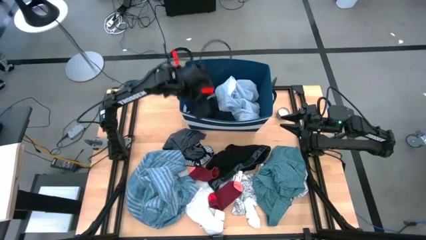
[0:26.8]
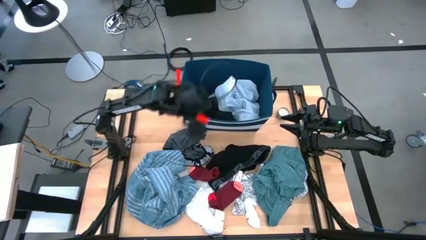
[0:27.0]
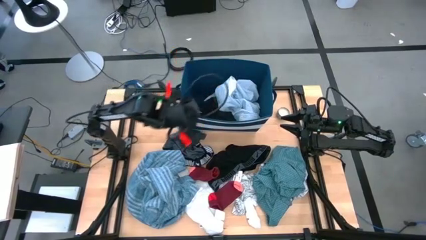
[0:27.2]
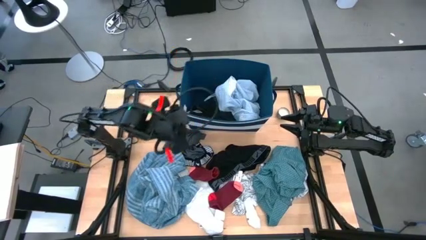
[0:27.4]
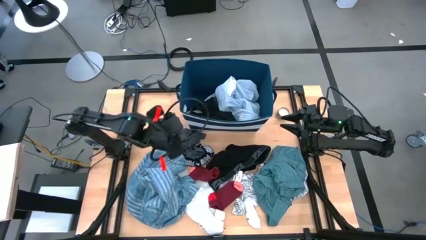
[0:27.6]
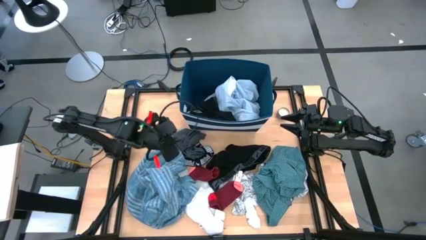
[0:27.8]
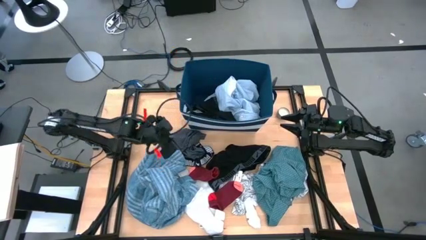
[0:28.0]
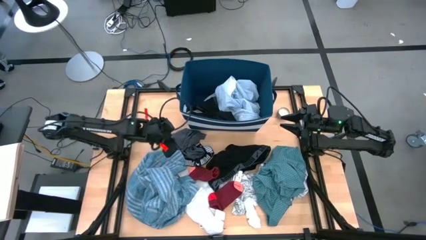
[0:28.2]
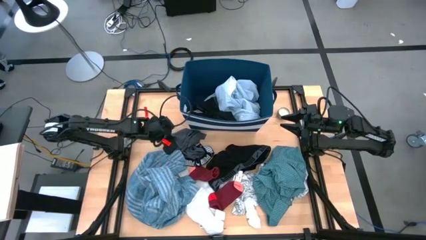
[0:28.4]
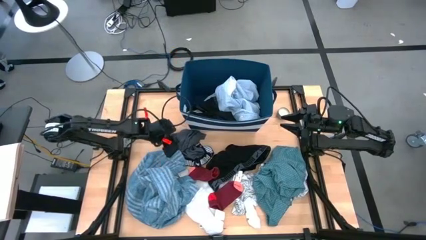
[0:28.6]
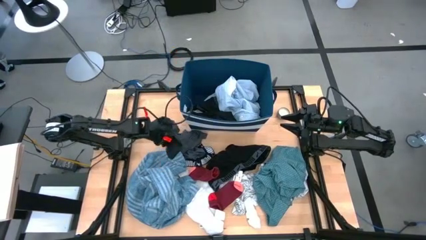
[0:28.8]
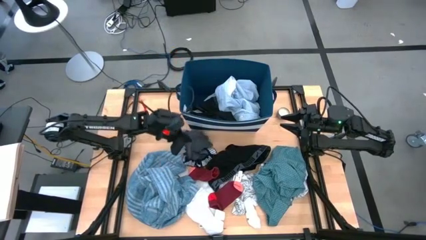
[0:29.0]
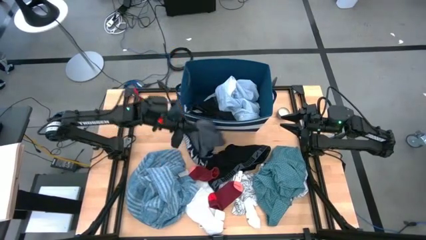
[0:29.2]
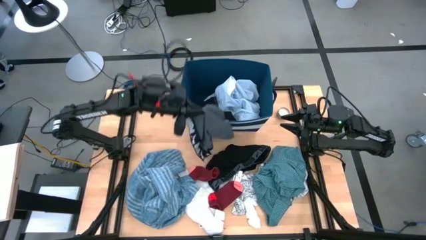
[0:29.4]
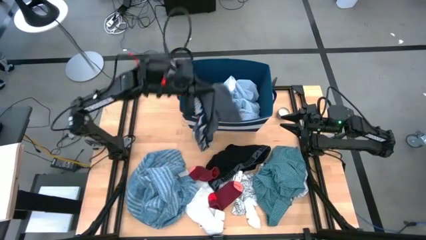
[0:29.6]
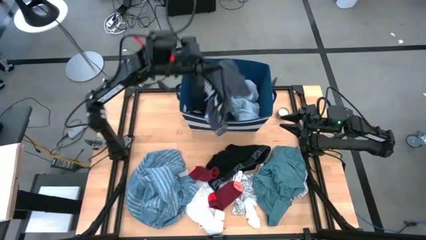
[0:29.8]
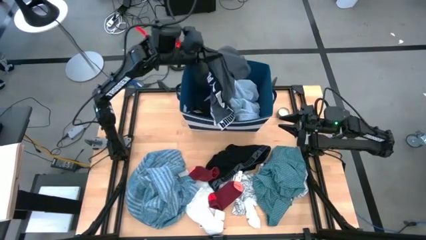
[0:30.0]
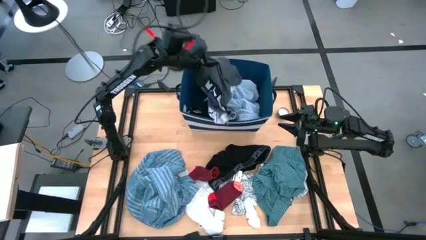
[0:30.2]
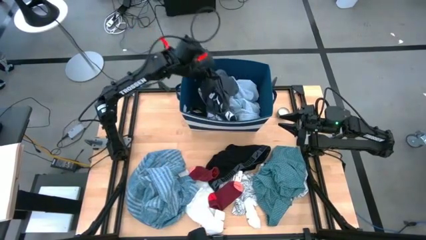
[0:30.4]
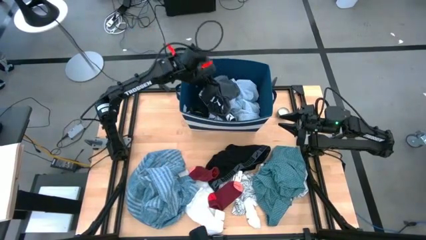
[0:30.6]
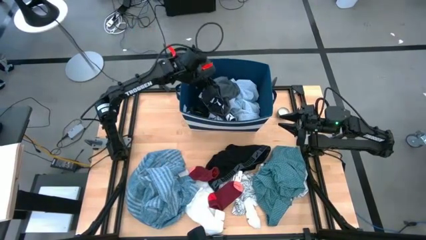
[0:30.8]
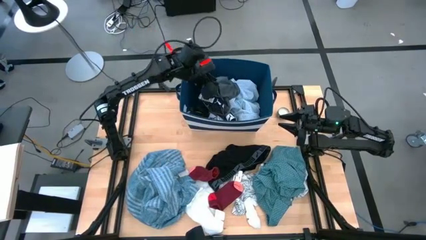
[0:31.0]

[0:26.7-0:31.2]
Task: Sort clothes
Put the gray boxer into the blue laundry bin

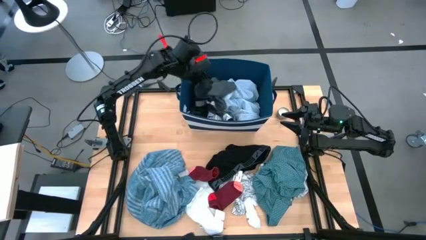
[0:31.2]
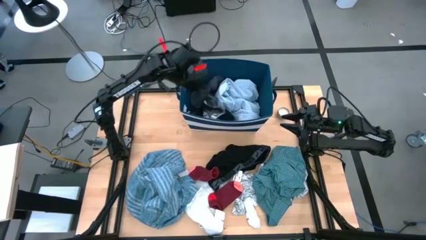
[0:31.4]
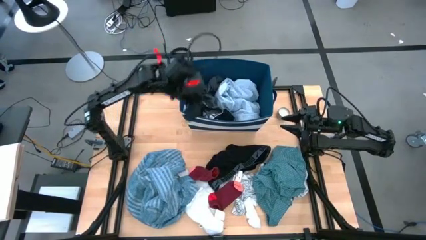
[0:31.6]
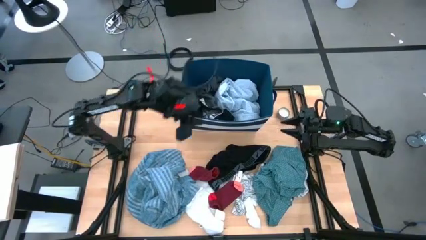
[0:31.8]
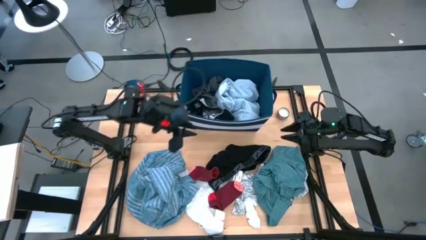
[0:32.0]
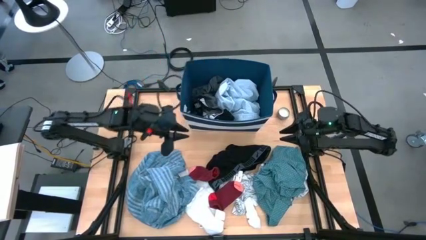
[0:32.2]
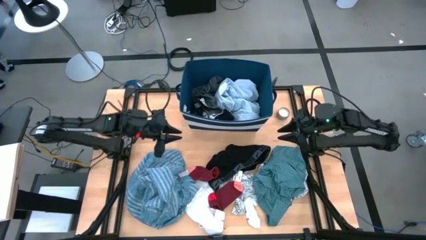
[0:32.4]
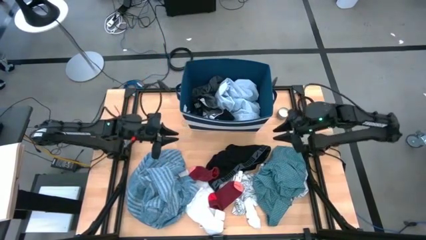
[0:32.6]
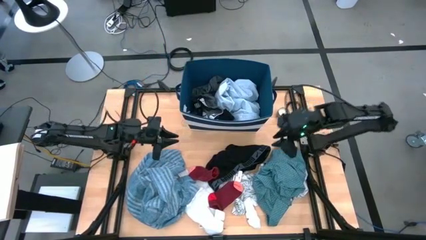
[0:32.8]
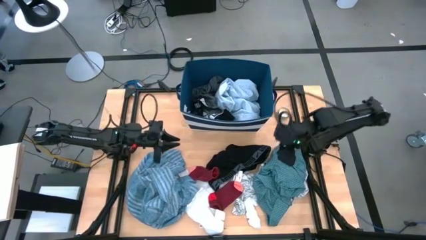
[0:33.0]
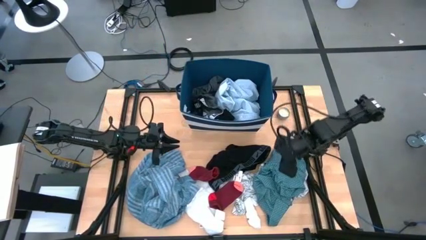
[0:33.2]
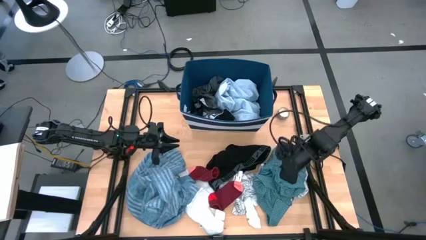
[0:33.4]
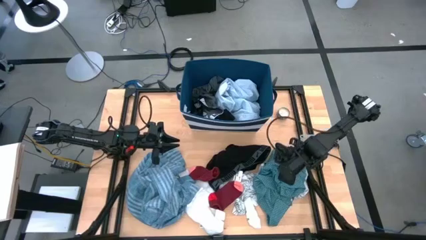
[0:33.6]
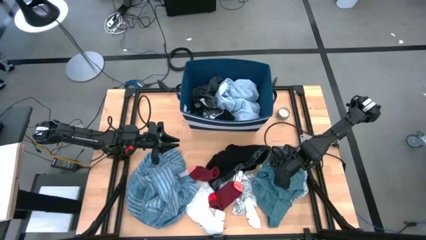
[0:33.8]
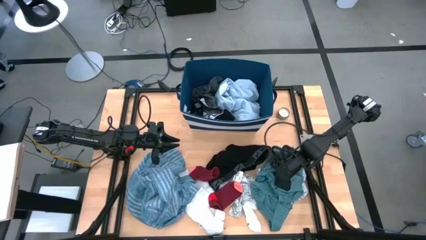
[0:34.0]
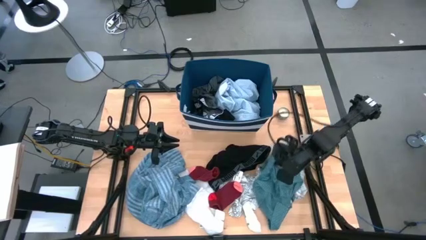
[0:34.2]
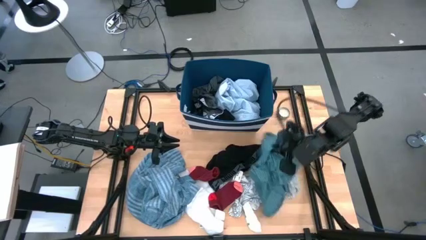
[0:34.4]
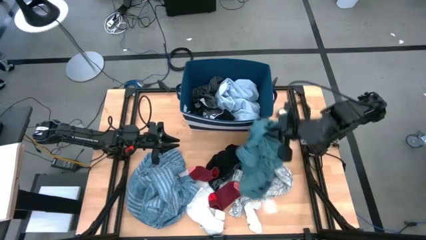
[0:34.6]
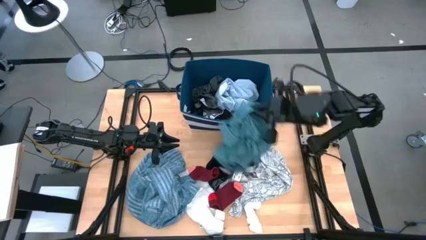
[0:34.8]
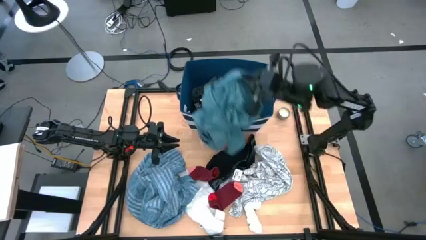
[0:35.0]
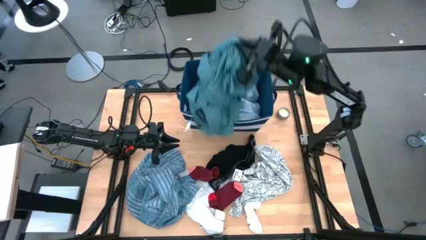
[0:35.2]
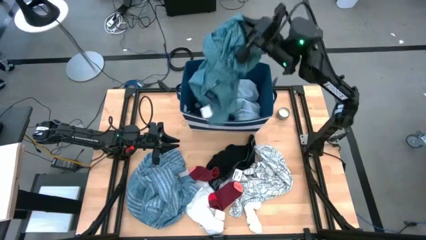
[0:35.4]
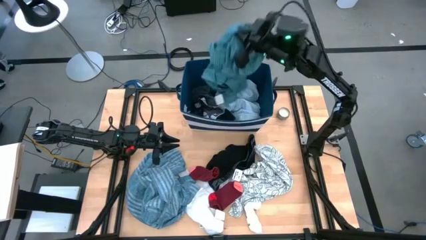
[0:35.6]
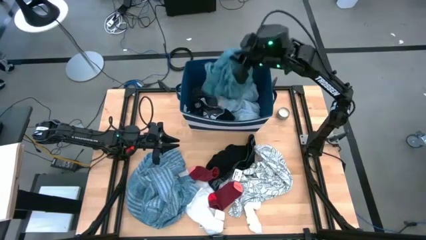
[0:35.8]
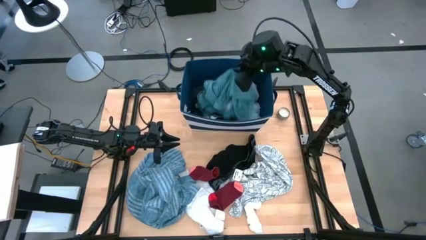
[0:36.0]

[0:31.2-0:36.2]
Put the green shirt into the blue laundry bin

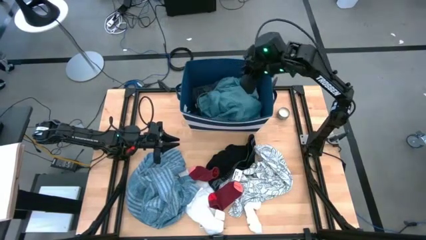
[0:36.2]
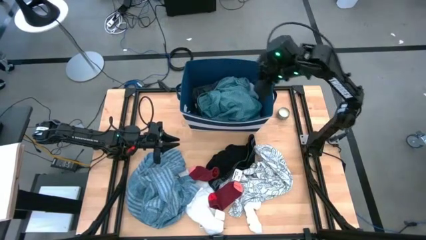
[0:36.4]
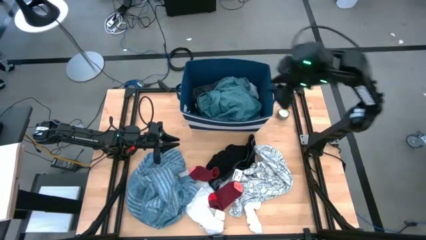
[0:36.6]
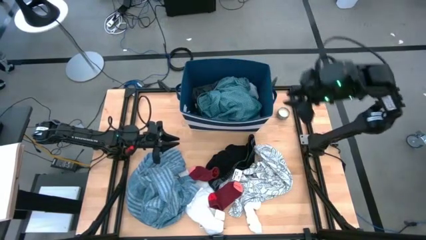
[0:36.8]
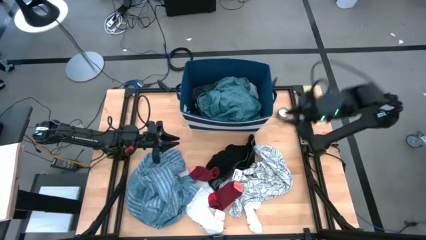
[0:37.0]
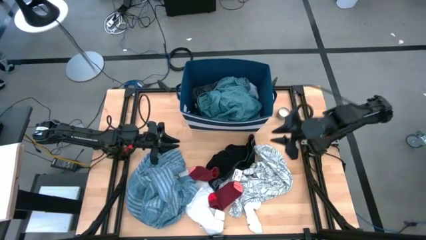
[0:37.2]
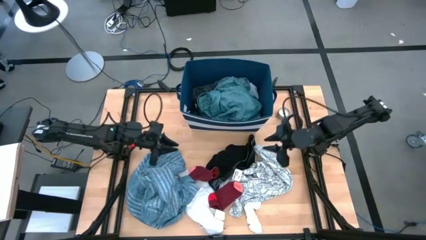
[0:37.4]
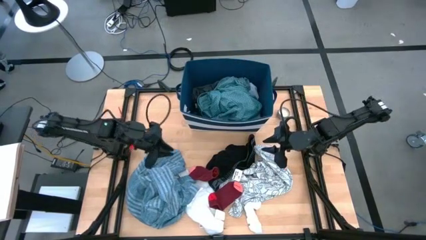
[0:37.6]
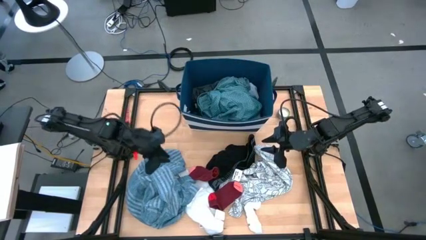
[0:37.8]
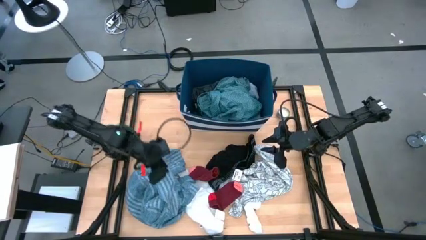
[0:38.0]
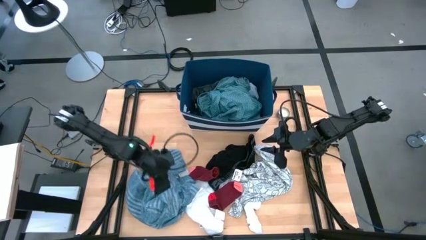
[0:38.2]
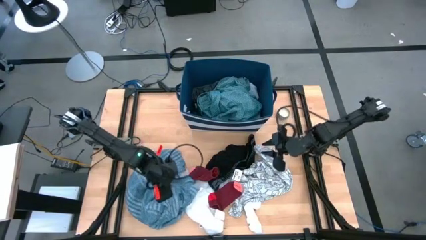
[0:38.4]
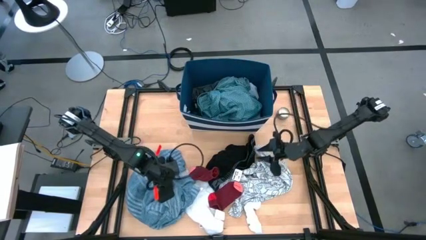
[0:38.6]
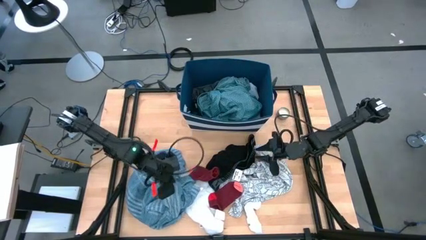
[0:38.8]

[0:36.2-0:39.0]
Put the blue shirt into the blue laundry bin

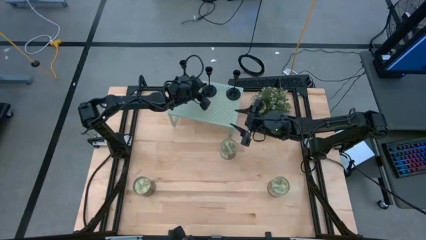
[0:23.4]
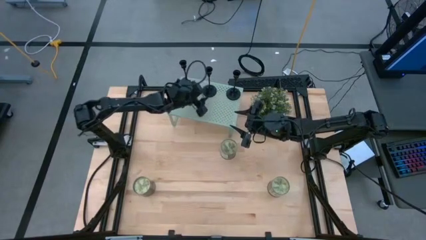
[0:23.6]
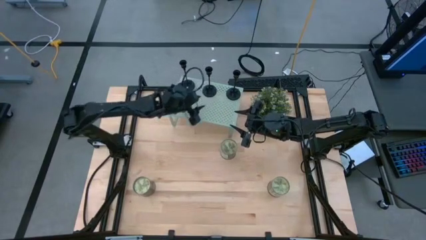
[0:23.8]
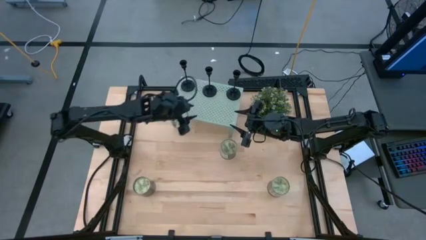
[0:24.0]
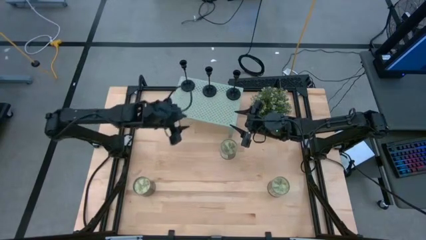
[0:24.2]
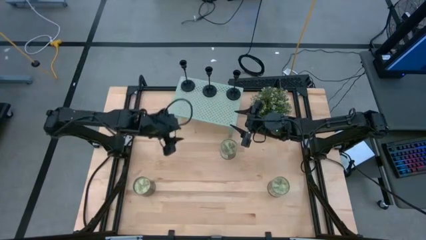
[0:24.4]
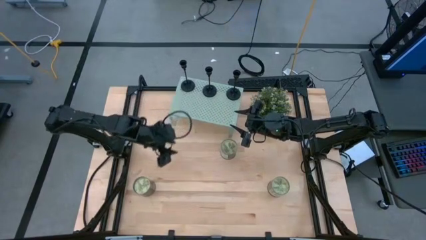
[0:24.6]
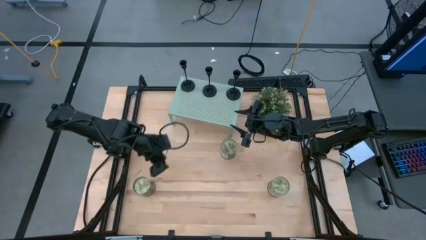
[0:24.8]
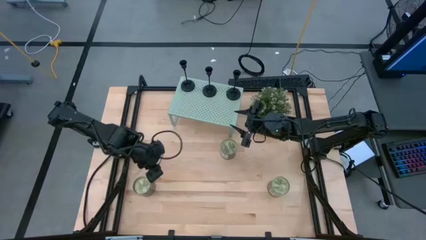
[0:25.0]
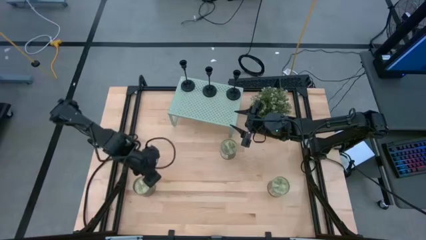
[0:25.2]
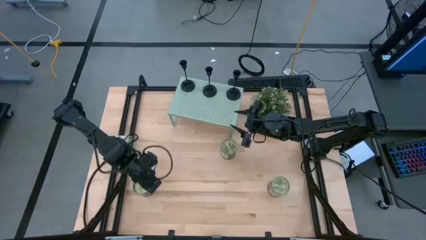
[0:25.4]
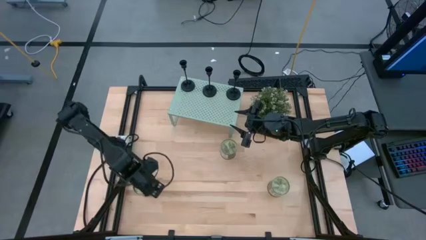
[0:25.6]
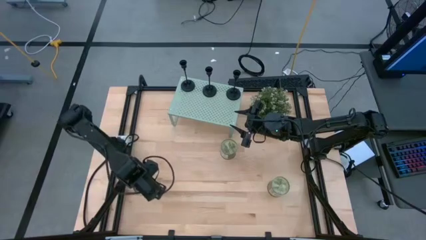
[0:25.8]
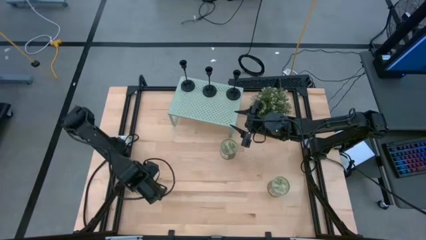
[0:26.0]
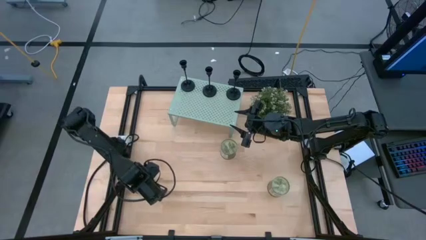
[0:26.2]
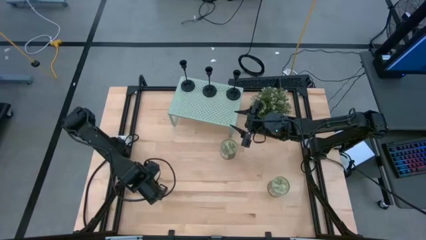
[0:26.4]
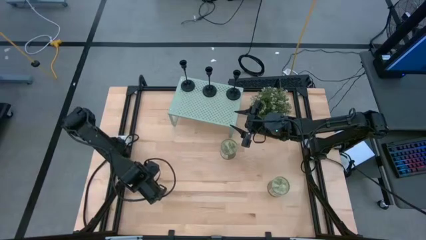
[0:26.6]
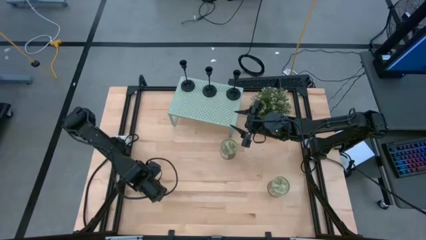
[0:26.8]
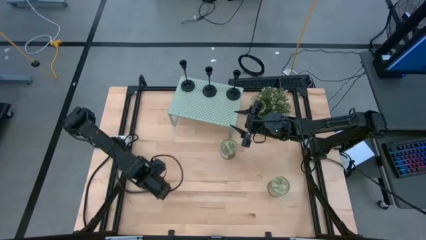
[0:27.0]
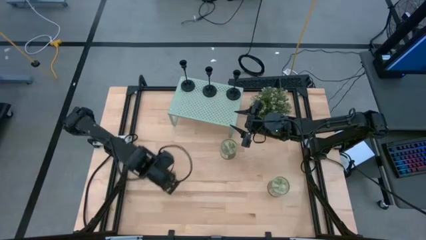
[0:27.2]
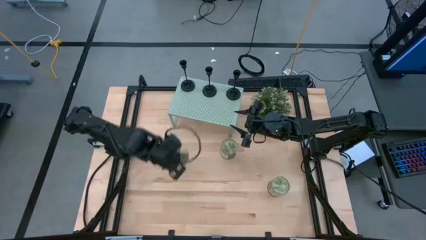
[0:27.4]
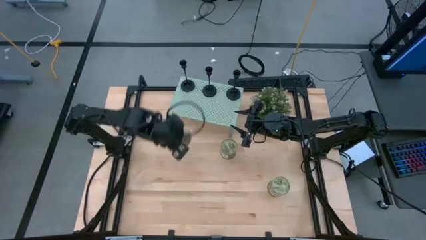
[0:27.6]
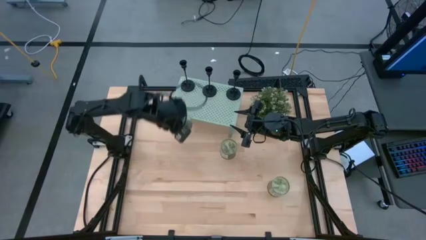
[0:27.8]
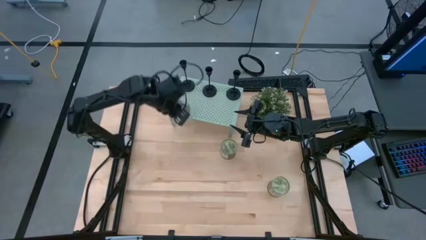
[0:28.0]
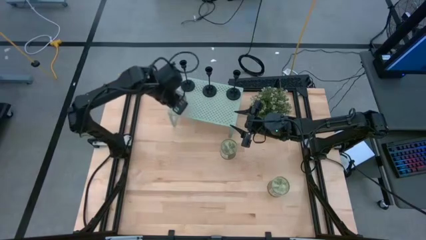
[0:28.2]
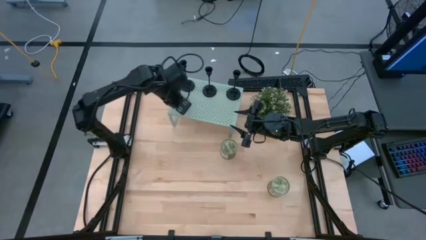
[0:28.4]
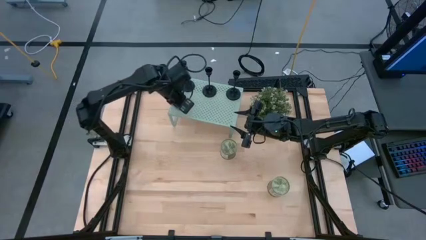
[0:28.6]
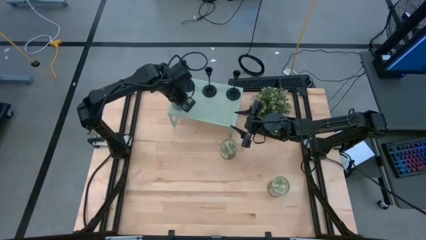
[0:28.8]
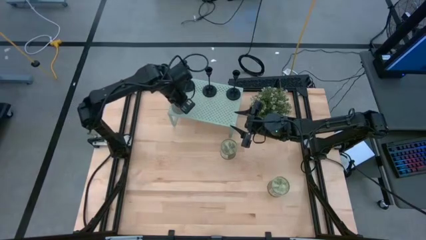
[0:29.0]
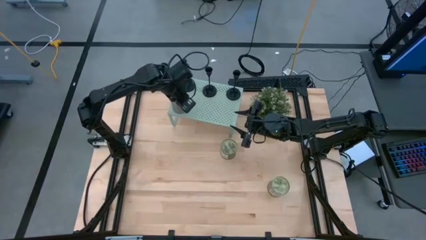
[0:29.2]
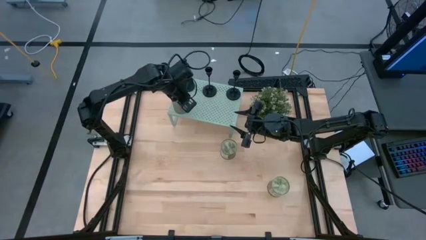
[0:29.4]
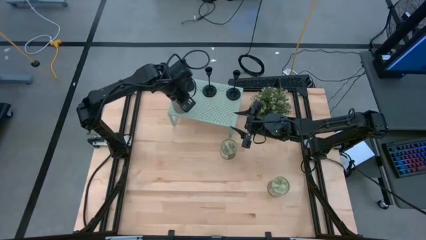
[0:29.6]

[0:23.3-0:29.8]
Task: Pick & Place candle stick holders
Put the left yellow scented candle on the shelf
